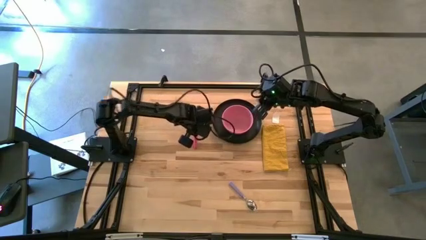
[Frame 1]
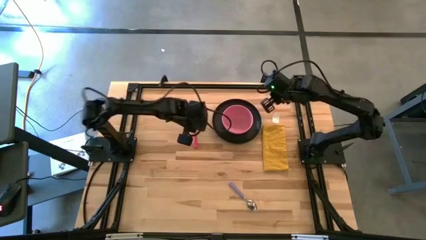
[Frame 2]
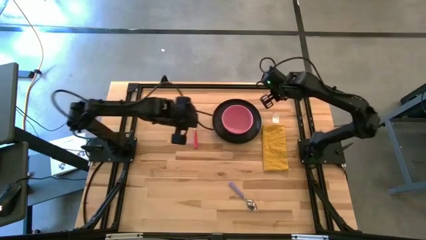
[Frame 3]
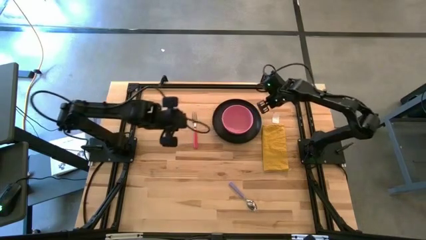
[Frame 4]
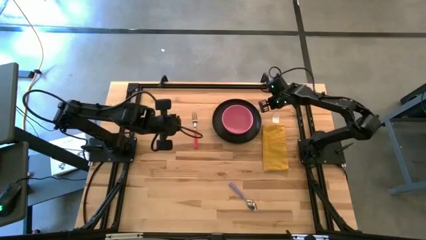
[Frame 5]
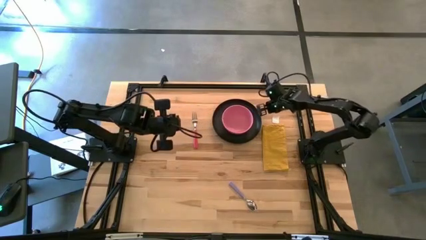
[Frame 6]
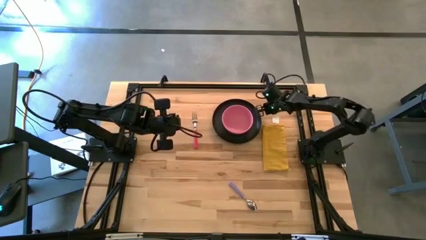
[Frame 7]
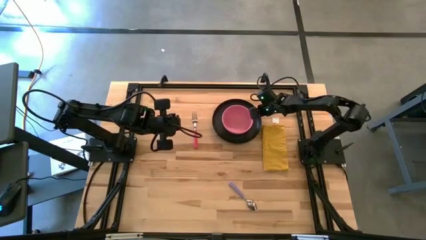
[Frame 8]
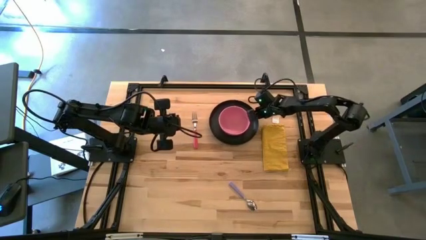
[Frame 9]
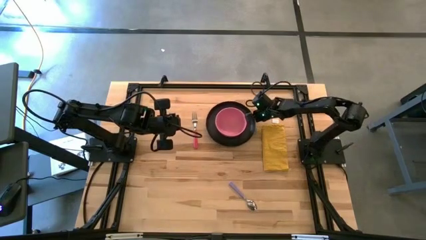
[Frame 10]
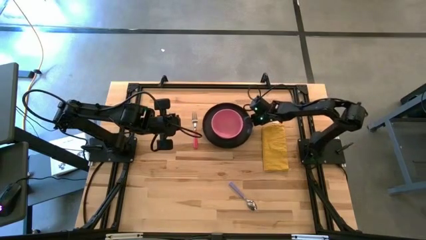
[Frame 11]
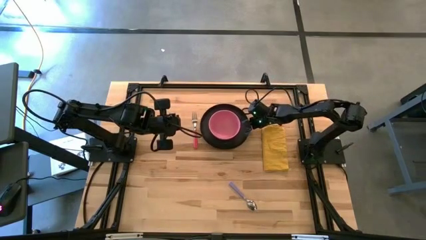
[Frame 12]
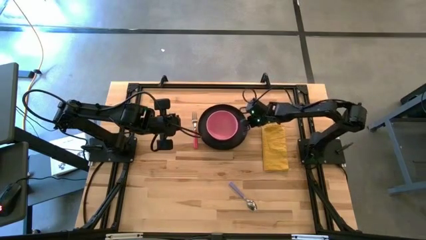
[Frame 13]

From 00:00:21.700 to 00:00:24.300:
Task: Set table place
Move the black plate to the center of the table

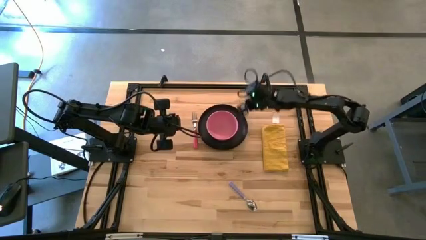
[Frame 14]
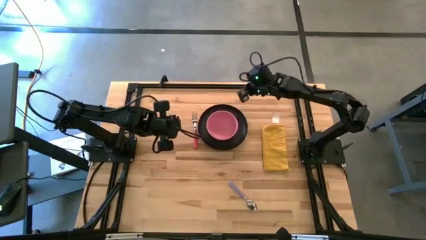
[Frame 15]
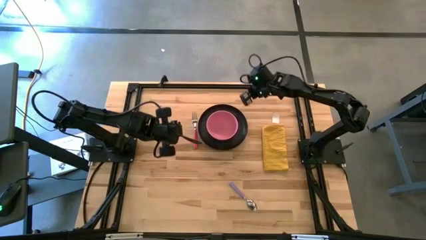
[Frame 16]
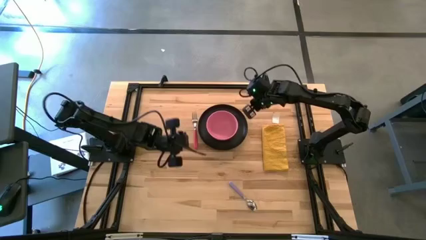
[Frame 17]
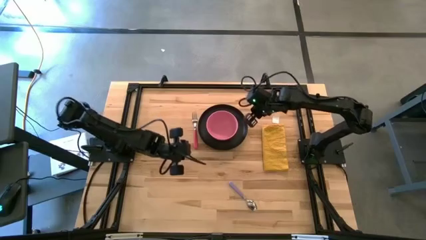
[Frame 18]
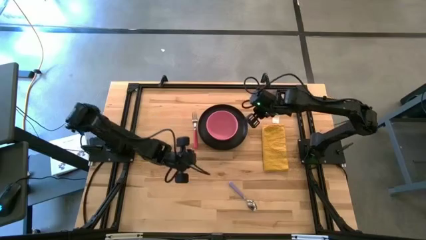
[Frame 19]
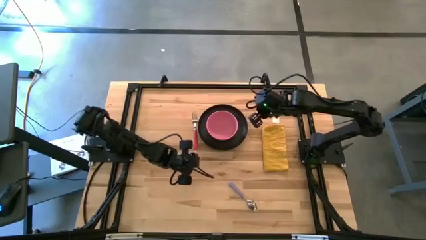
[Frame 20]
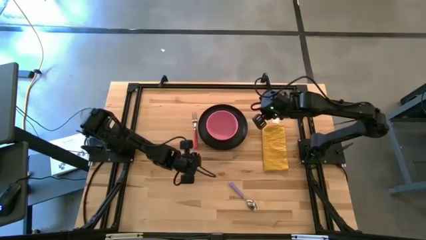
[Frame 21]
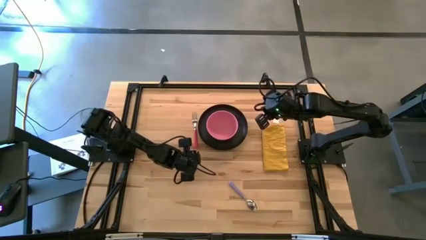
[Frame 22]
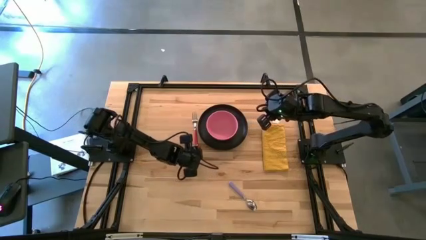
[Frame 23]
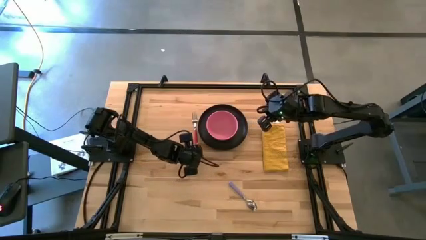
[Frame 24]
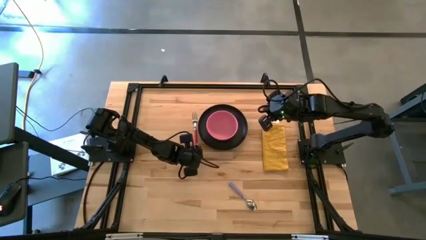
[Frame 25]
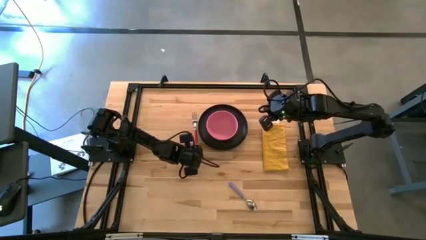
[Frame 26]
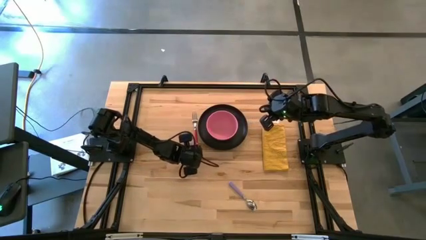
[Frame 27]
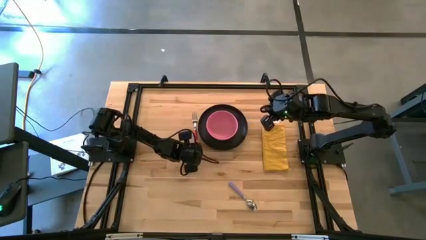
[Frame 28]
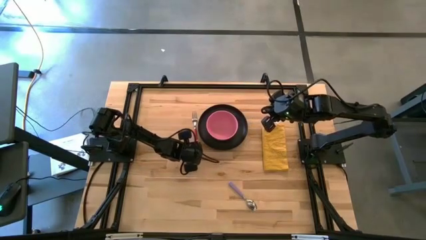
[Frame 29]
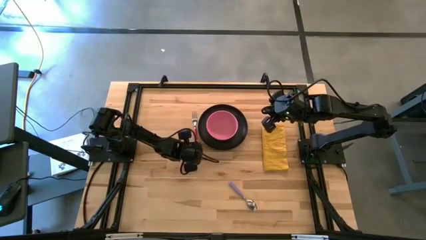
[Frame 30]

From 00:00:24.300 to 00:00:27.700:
Adjust the pink fork

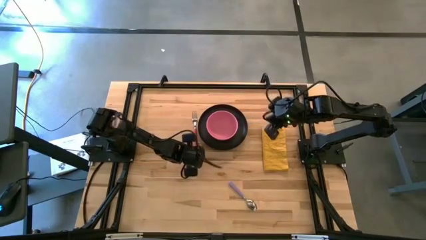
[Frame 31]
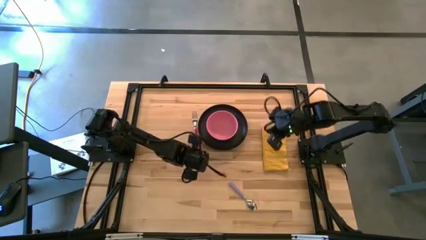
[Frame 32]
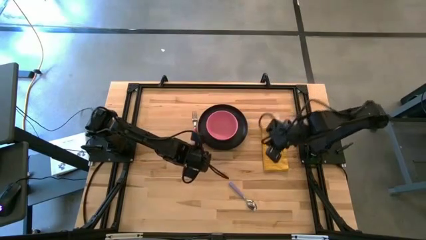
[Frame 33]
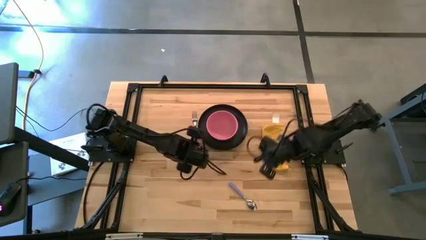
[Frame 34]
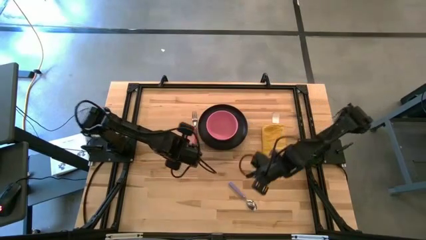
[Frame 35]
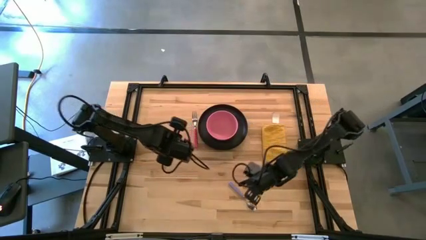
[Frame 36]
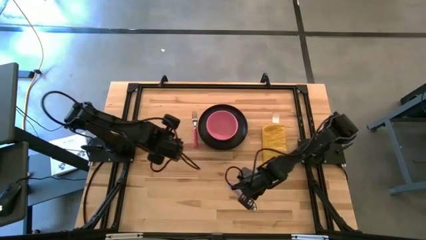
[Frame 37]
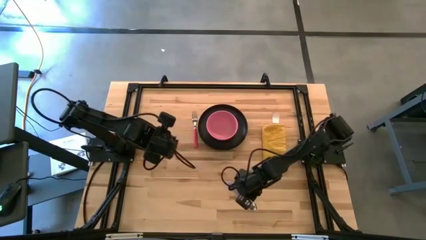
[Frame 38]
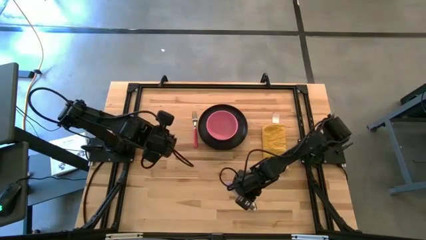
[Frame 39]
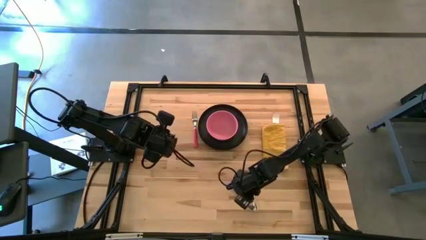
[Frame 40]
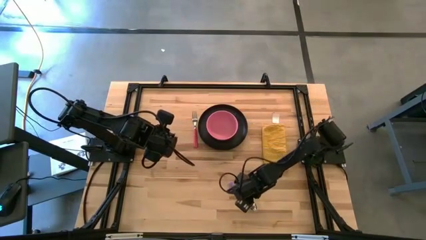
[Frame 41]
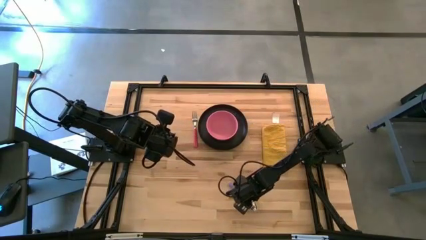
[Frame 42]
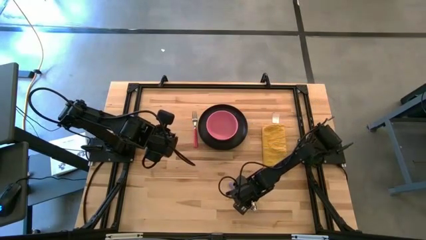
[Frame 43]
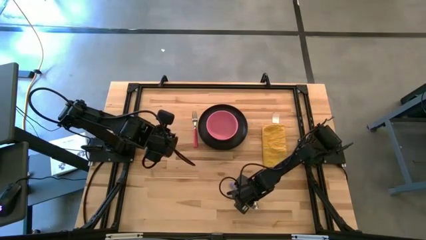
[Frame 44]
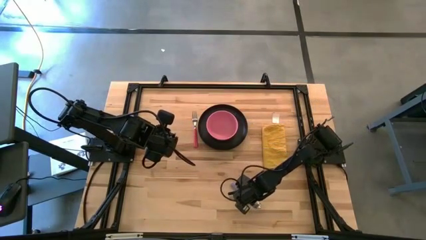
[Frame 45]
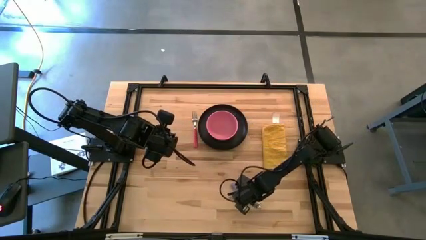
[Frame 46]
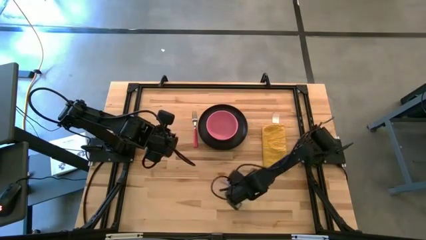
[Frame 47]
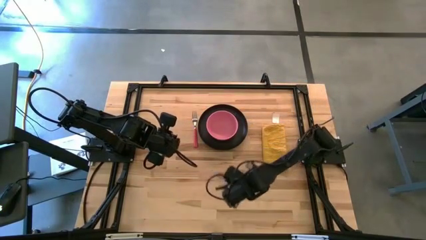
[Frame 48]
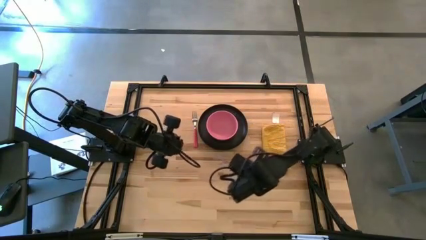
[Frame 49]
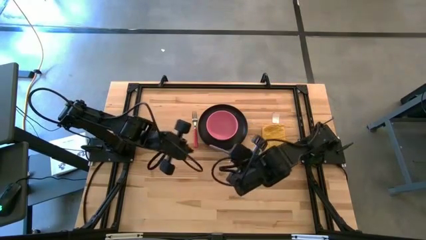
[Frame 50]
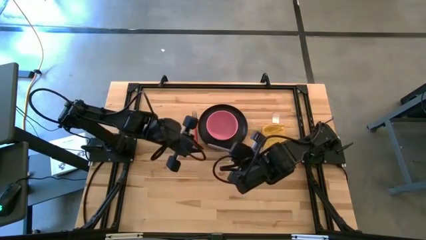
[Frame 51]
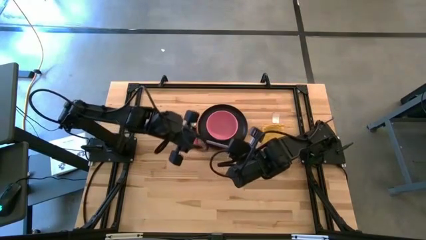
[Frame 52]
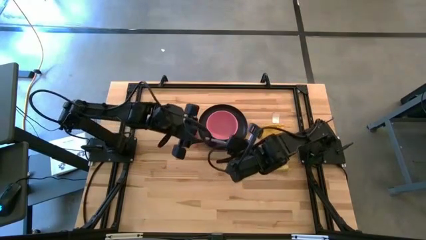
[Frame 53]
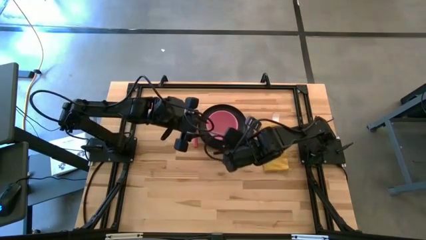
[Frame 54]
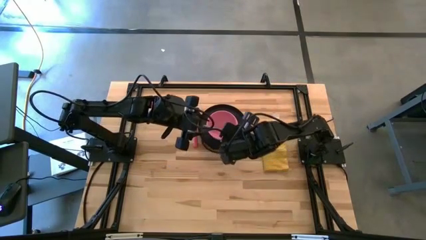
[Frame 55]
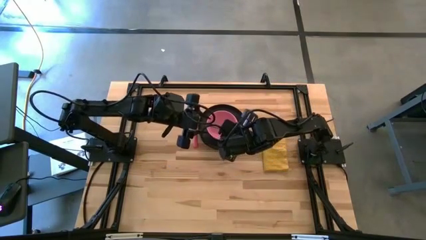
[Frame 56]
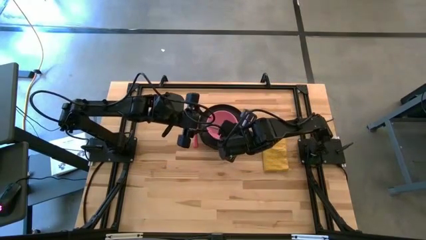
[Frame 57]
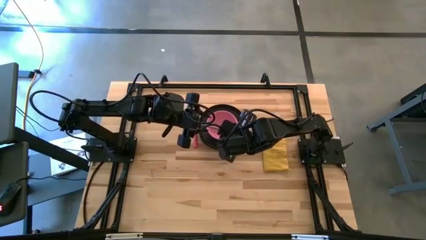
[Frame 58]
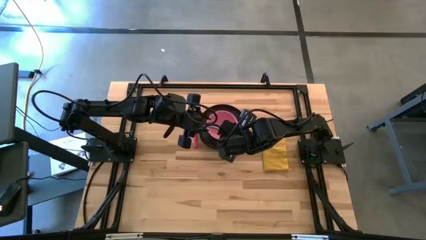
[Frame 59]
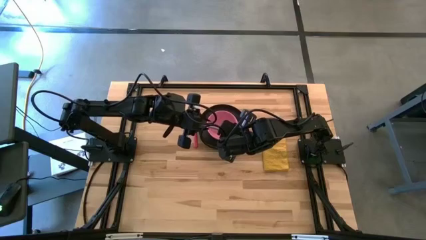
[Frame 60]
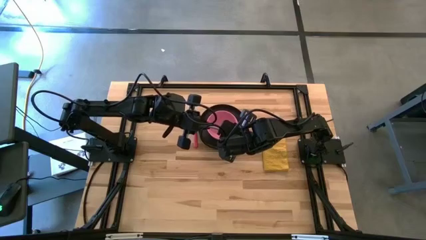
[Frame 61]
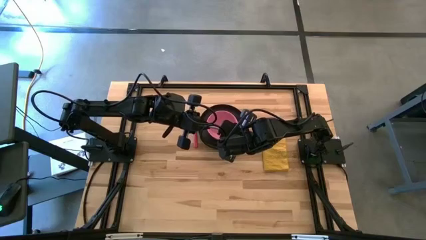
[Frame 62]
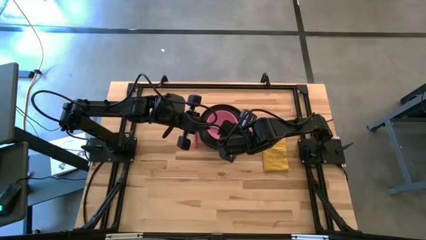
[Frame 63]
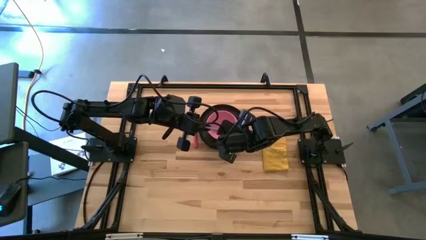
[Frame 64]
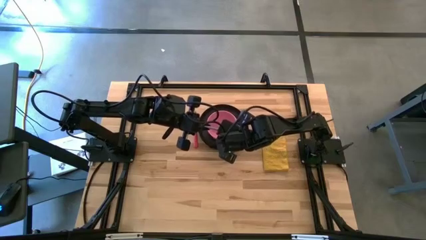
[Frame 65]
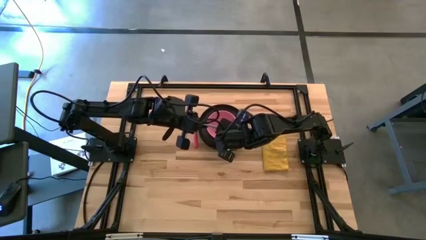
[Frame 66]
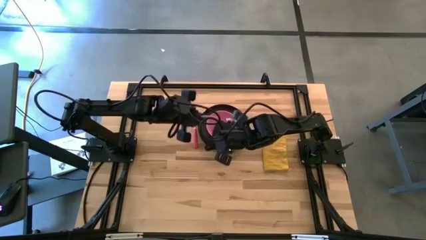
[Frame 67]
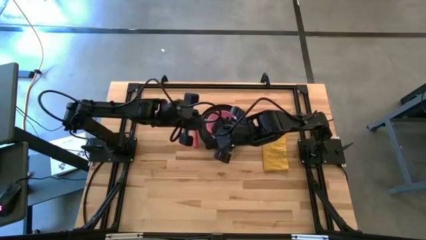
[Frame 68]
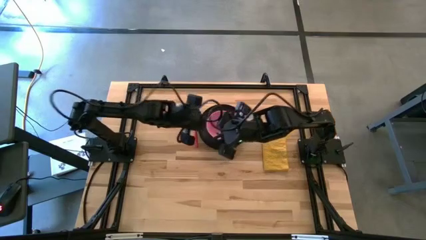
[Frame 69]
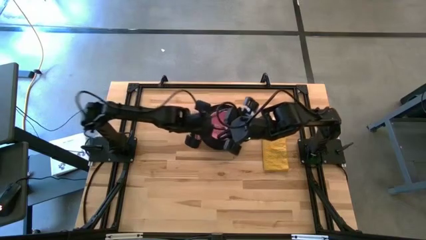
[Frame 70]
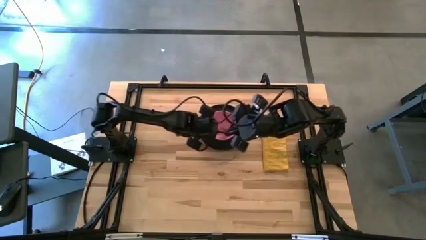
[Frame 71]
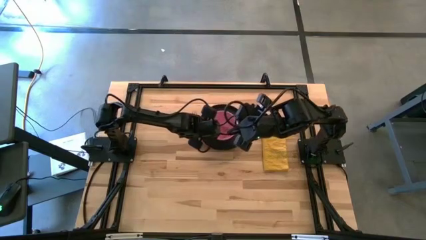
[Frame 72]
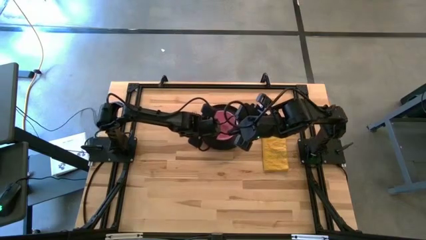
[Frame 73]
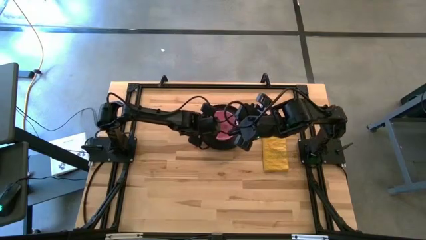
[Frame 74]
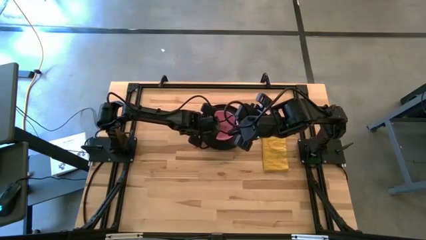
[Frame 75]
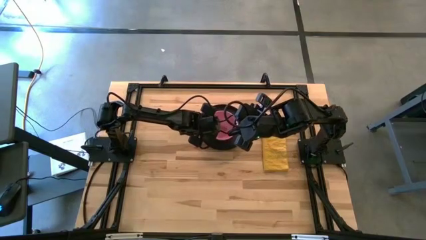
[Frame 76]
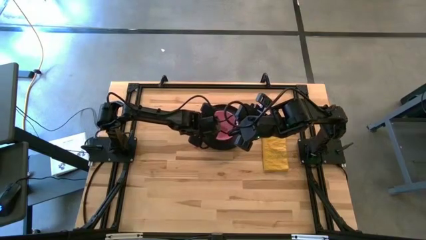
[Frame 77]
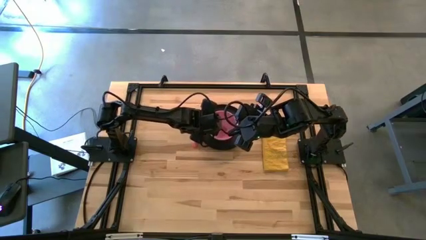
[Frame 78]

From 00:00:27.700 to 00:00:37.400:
Put the purple spoon into the pink bowl
